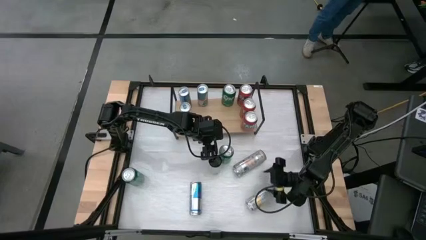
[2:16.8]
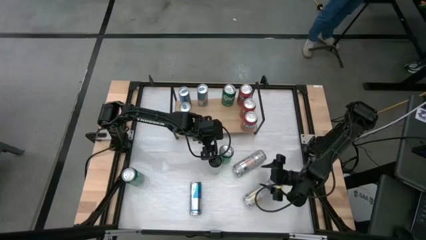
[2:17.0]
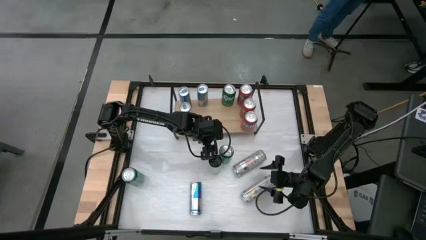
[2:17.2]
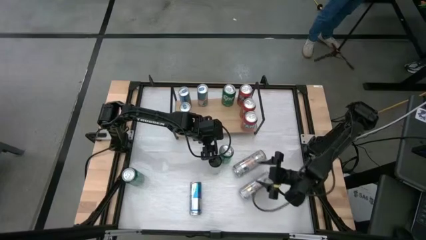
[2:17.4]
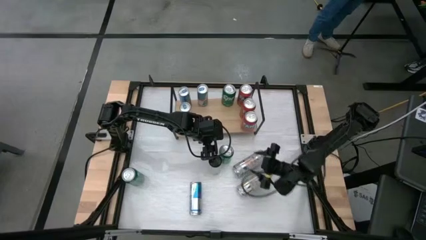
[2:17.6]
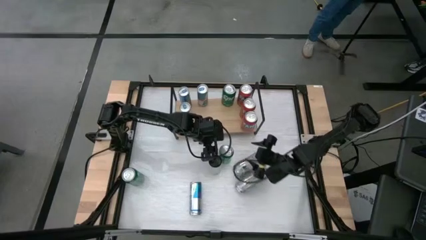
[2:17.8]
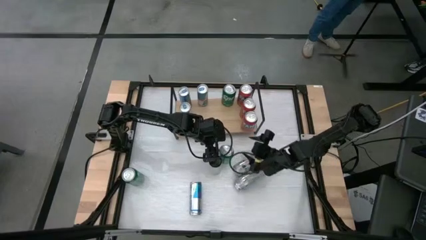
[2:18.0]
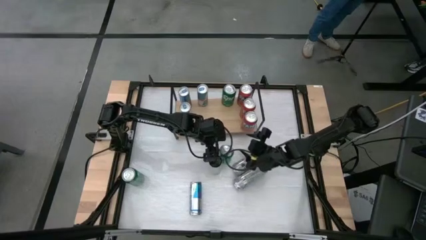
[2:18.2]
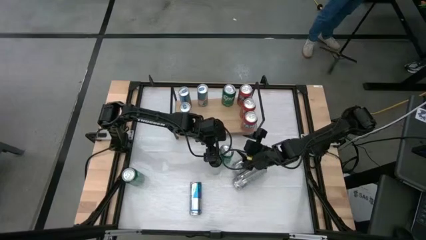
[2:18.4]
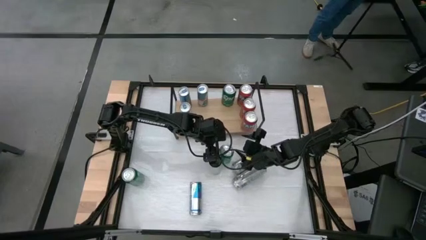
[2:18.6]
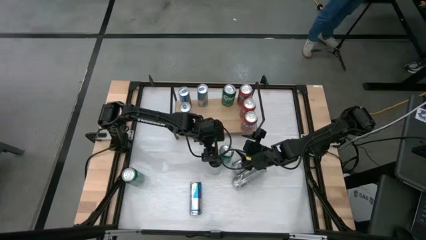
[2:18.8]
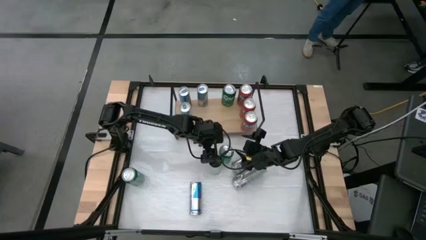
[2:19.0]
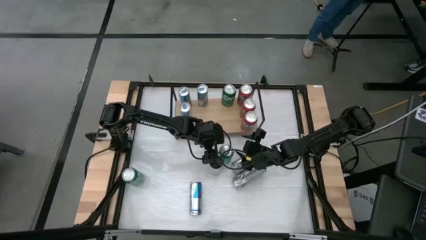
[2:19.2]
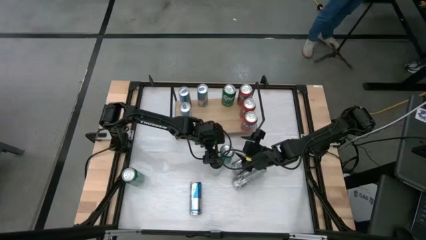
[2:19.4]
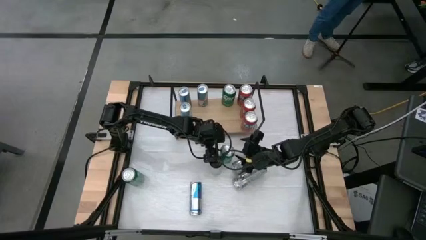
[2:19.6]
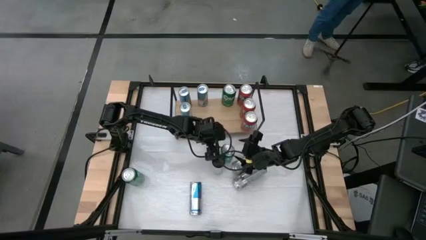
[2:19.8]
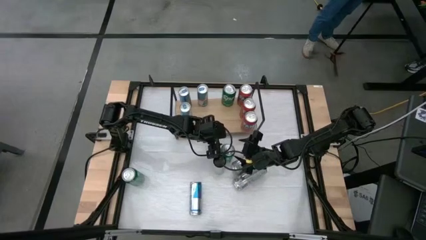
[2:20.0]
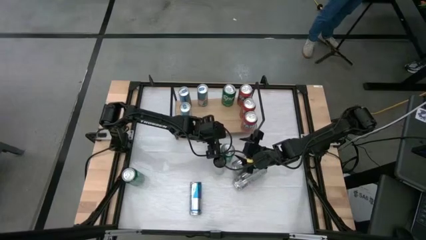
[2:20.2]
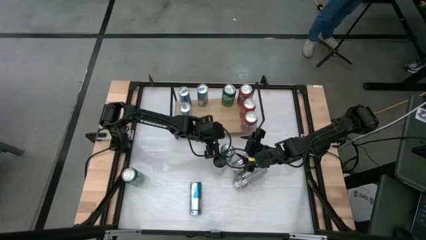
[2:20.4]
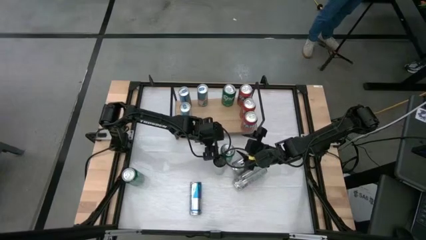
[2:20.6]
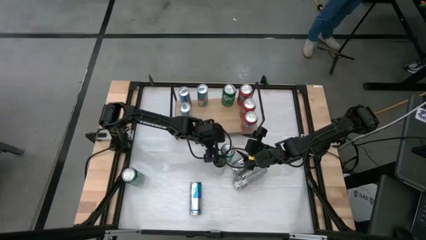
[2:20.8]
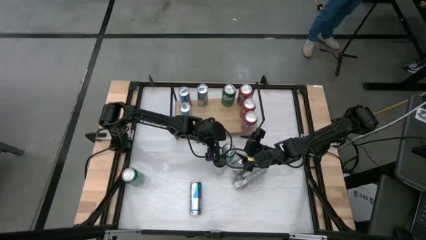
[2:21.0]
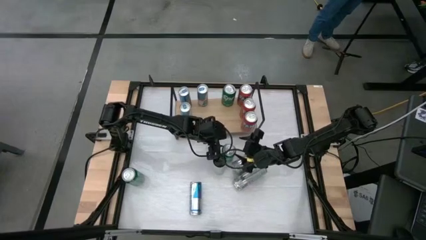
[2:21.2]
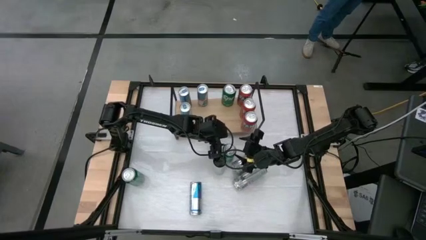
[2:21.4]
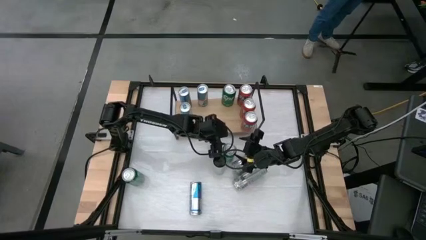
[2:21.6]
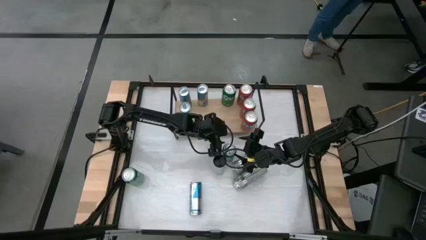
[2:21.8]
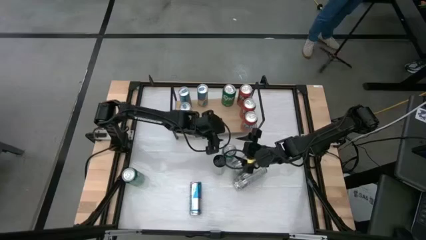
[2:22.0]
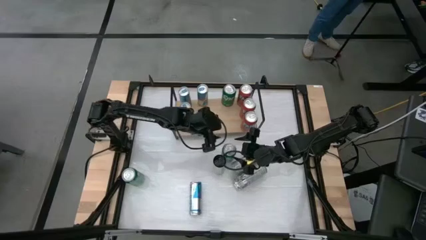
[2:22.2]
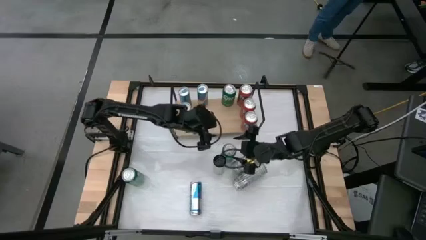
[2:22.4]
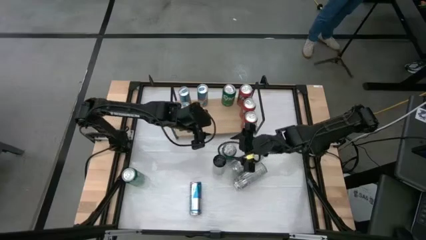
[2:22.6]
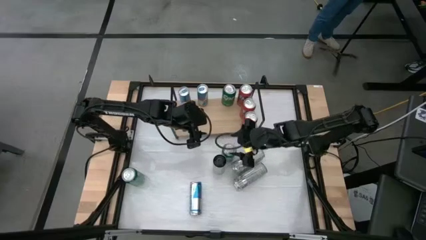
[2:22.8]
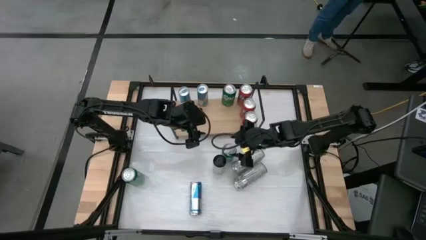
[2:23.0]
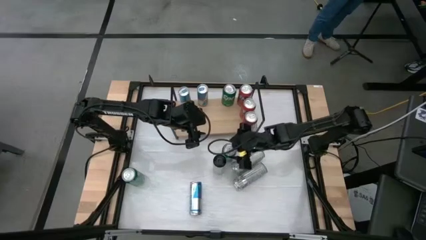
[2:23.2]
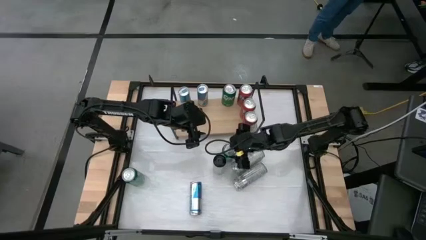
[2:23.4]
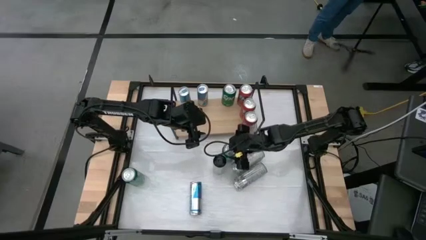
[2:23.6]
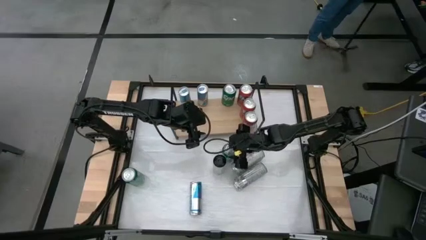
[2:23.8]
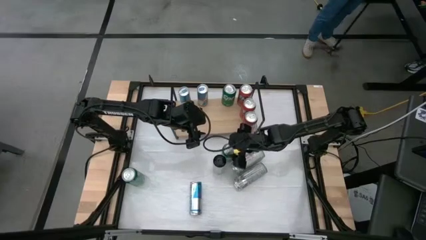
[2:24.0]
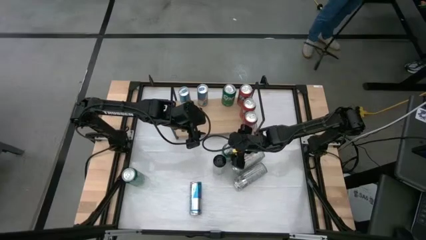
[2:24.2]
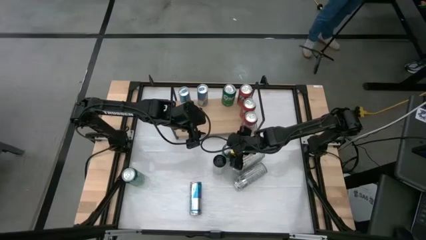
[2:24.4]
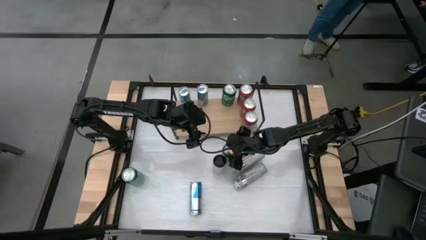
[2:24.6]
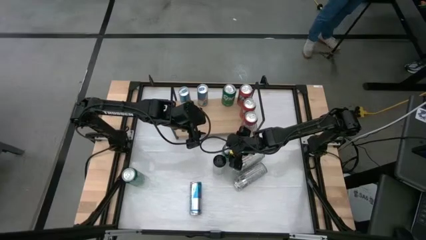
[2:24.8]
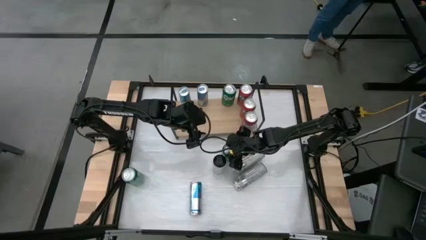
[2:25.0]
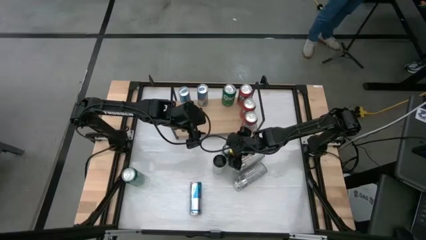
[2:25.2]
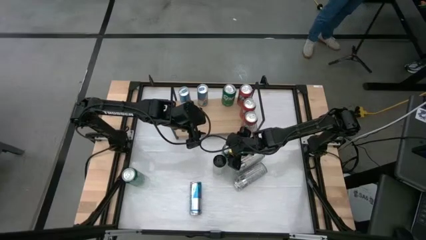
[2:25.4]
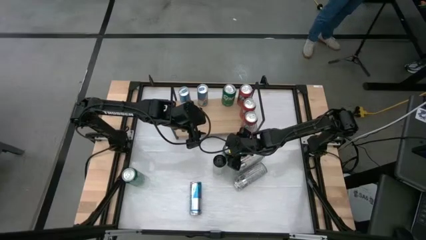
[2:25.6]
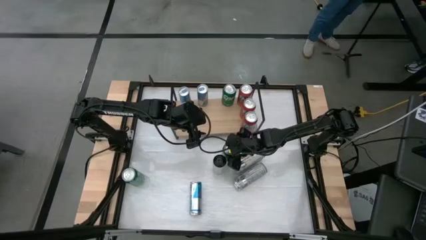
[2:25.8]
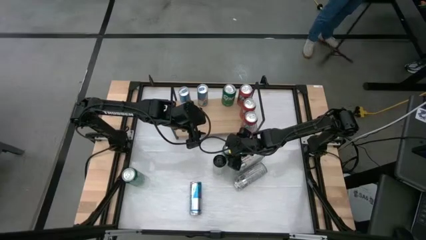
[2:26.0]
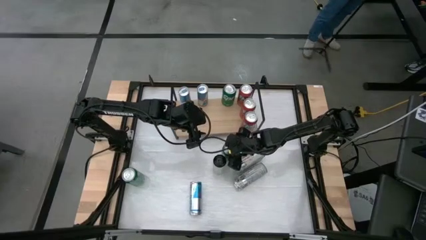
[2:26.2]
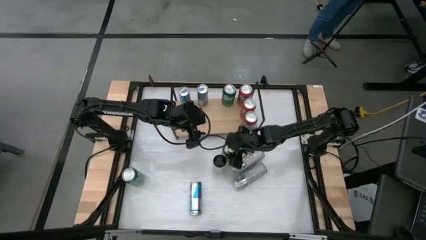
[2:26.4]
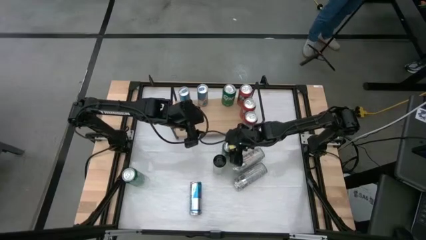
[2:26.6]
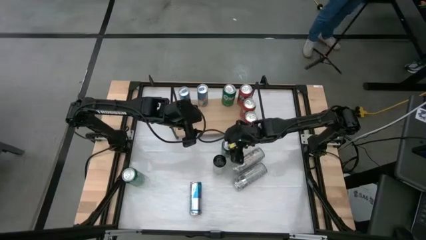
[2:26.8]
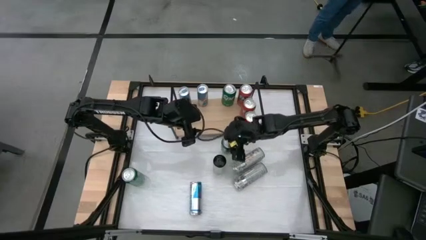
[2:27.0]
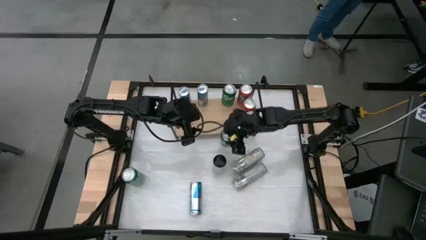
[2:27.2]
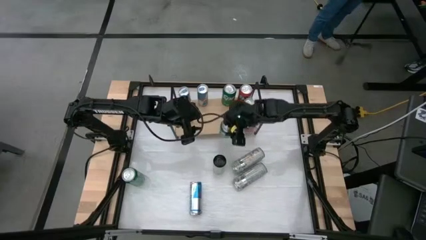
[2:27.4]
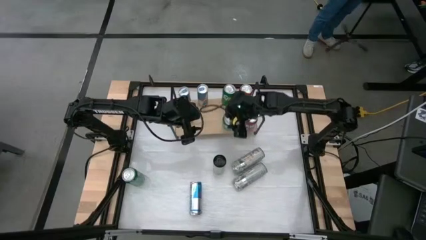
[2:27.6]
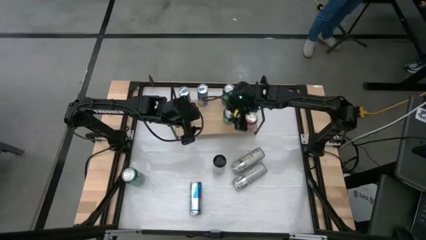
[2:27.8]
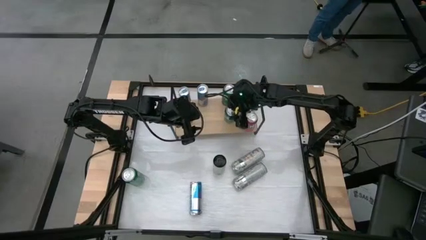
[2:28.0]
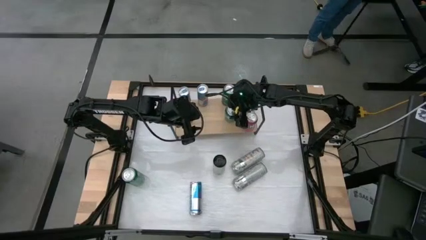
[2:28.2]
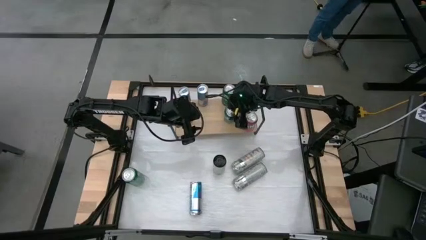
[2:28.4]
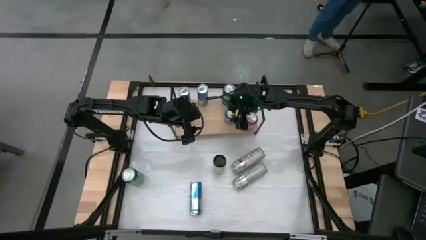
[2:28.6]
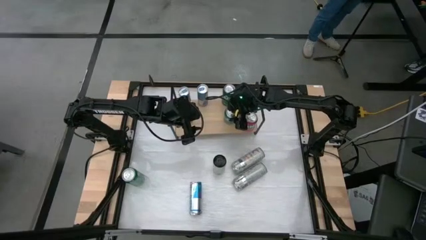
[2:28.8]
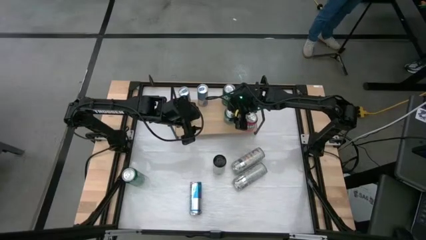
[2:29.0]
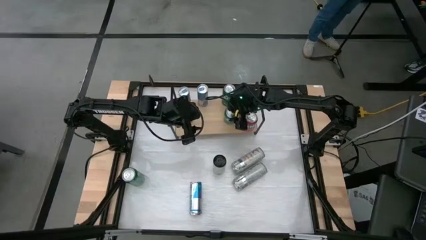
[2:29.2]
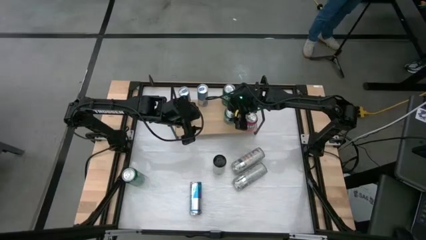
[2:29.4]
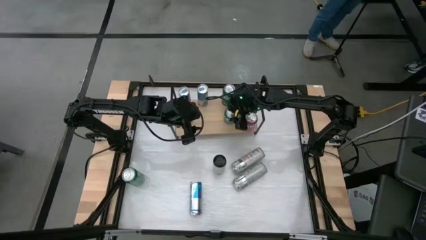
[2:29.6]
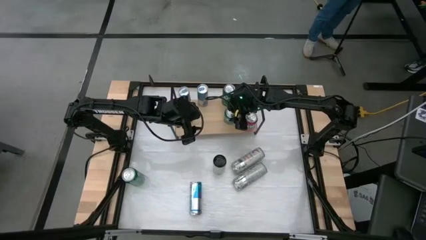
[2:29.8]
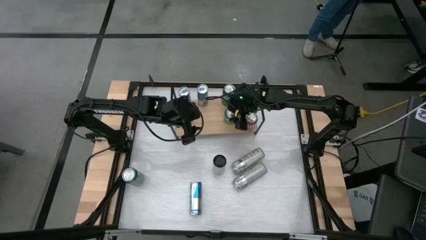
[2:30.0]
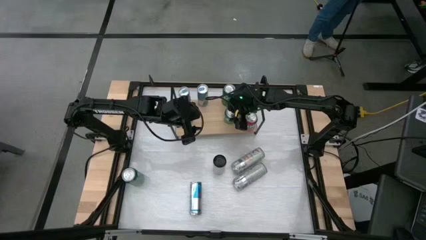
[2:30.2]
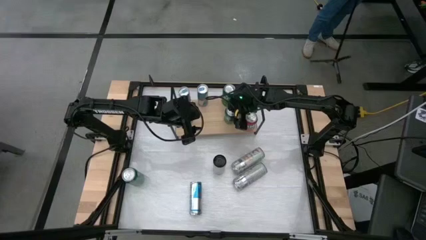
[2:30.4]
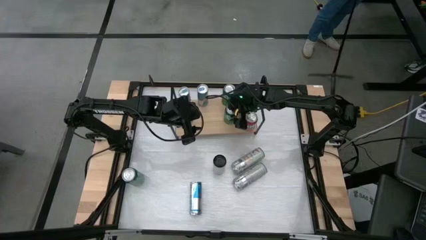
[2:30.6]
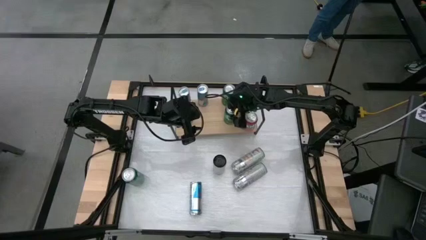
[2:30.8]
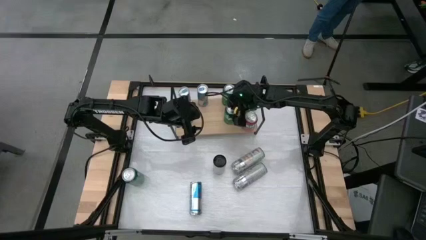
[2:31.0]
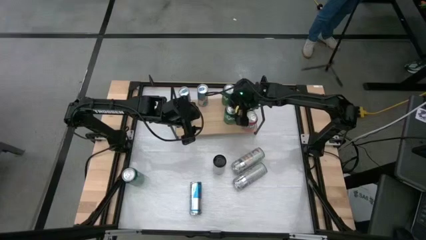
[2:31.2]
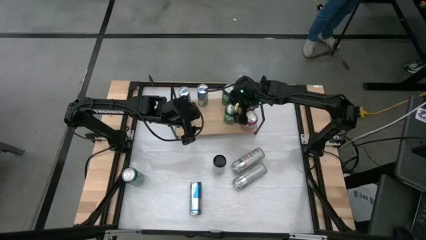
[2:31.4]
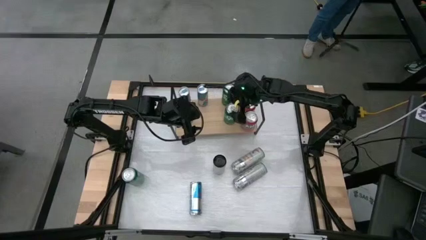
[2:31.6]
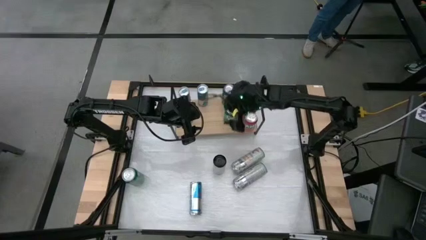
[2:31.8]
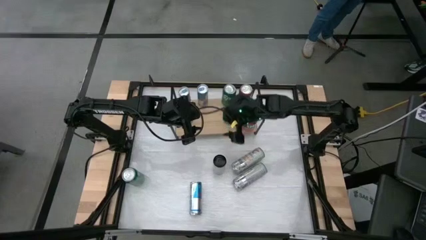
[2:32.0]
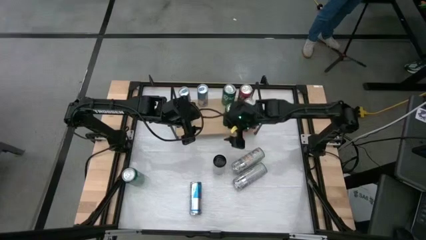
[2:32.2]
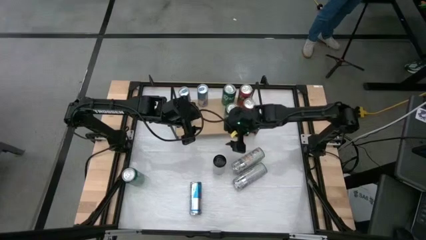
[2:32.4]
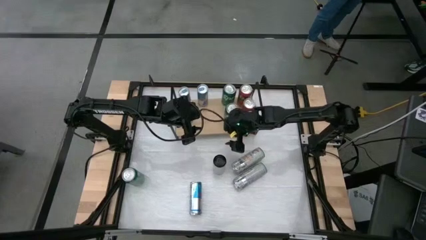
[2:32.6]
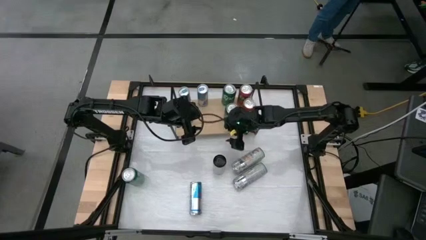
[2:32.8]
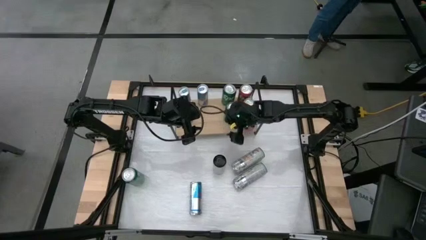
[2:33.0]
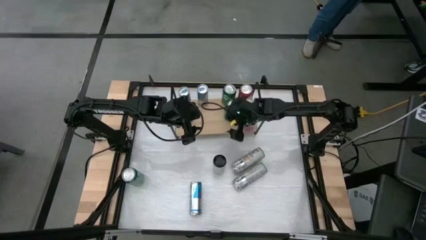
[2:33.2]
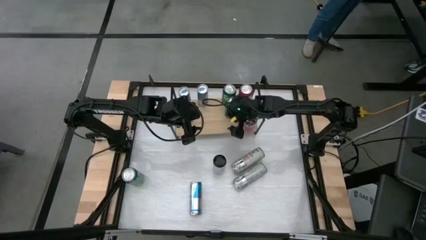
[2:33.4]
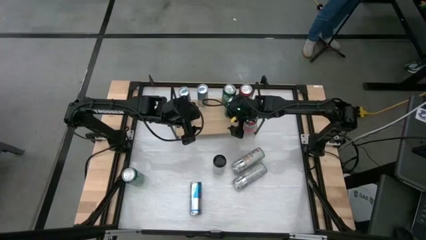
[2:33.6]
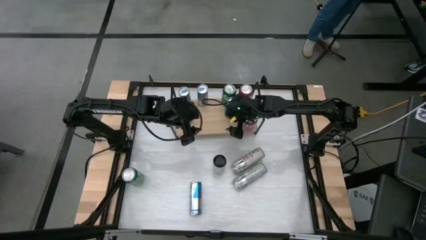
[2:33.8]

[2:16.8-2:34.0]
Task: Sort soda cans
Put the green soda can on the shelf and align with the other green soda cans
